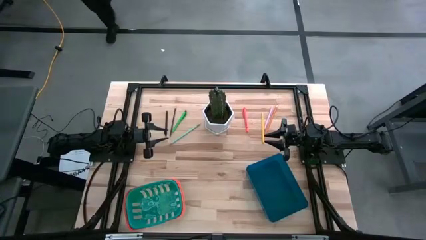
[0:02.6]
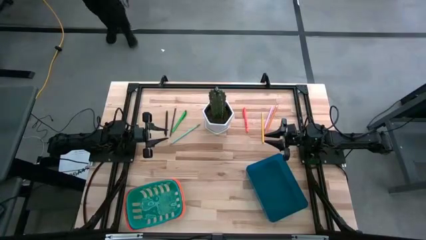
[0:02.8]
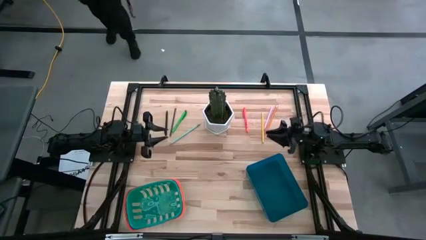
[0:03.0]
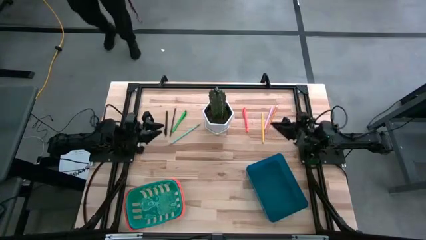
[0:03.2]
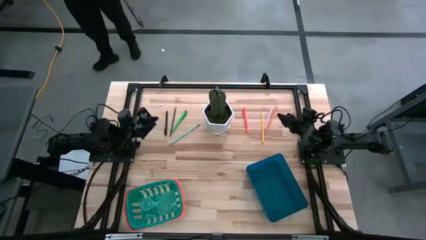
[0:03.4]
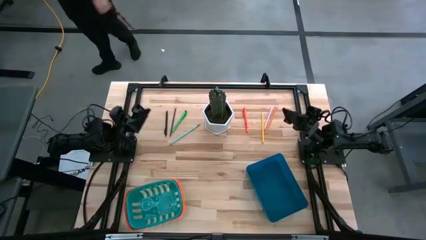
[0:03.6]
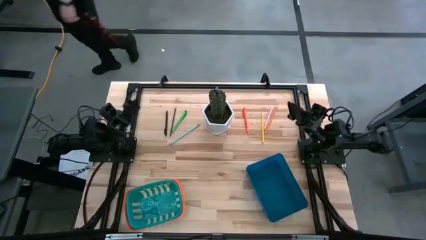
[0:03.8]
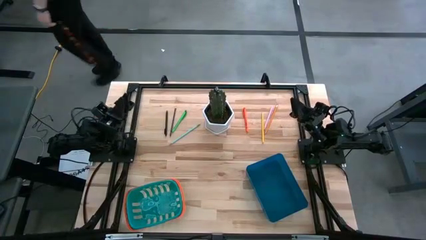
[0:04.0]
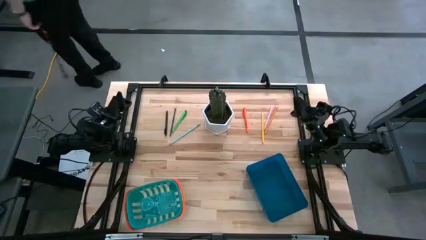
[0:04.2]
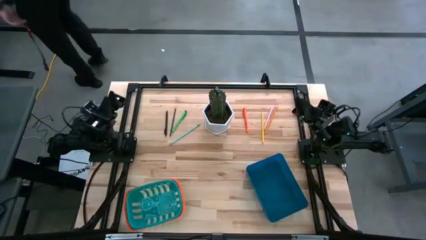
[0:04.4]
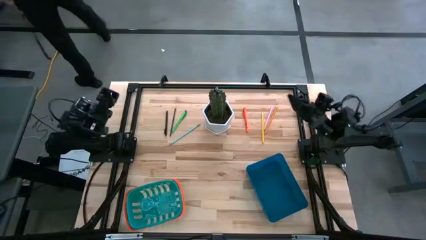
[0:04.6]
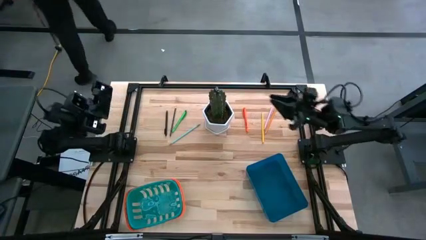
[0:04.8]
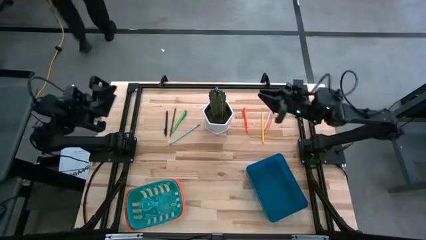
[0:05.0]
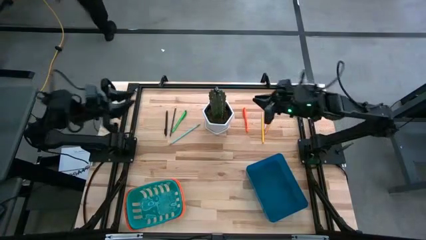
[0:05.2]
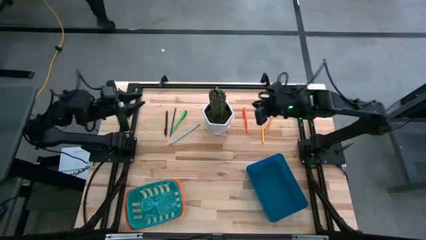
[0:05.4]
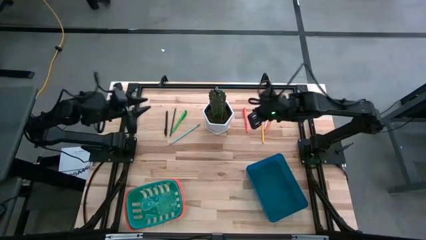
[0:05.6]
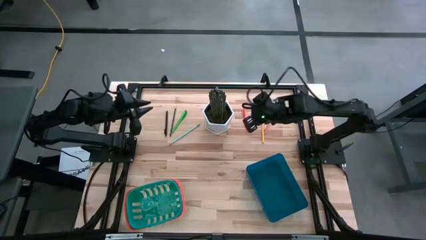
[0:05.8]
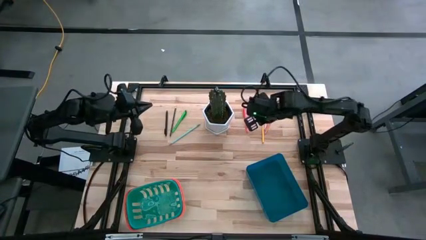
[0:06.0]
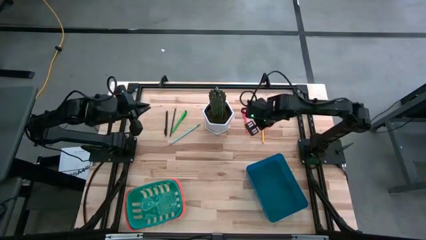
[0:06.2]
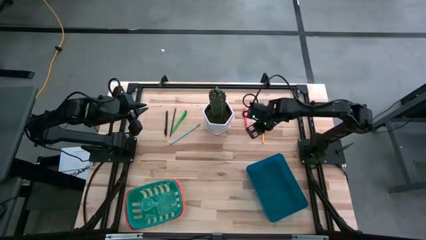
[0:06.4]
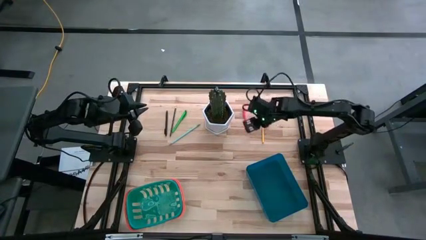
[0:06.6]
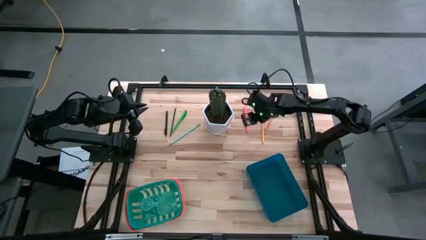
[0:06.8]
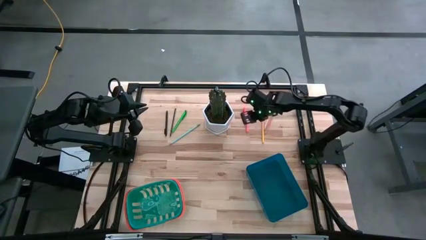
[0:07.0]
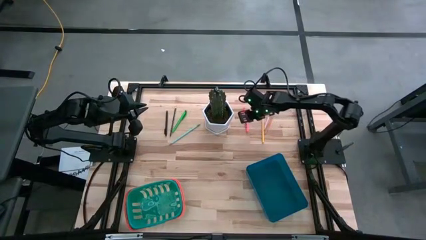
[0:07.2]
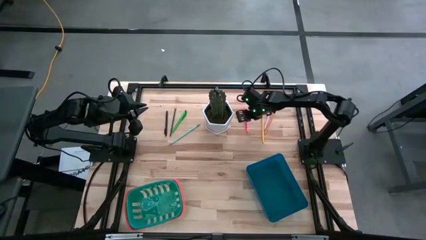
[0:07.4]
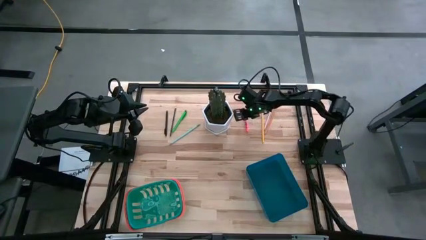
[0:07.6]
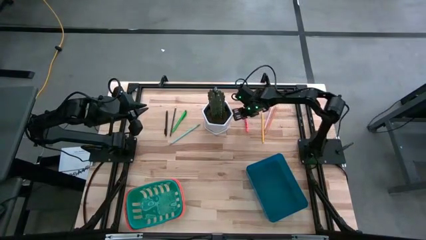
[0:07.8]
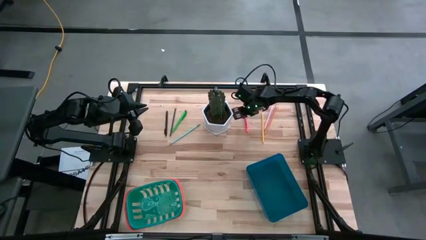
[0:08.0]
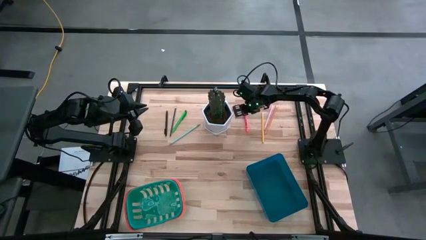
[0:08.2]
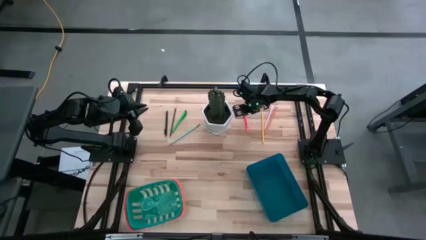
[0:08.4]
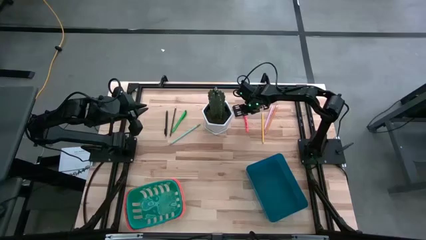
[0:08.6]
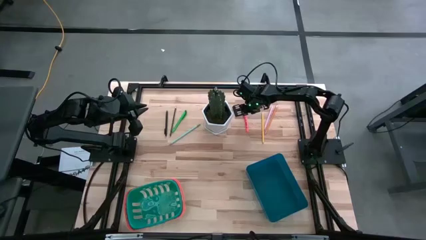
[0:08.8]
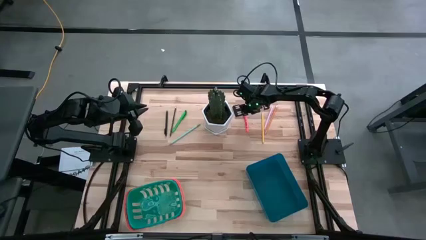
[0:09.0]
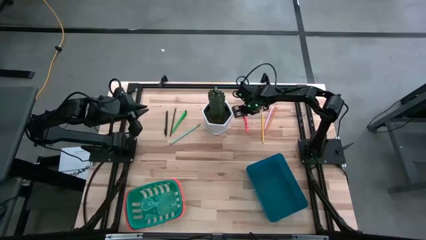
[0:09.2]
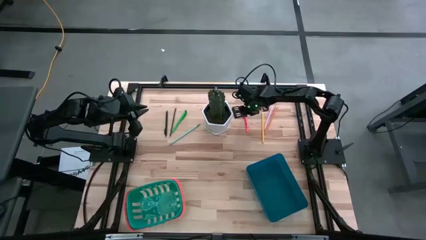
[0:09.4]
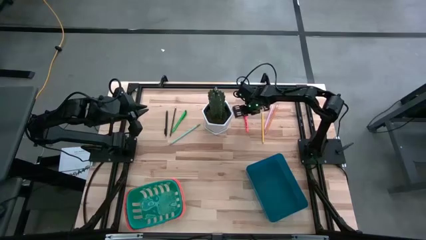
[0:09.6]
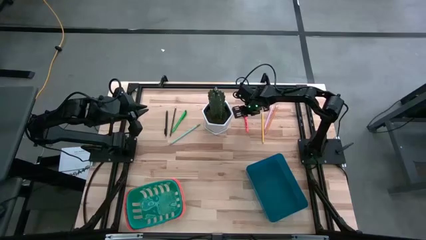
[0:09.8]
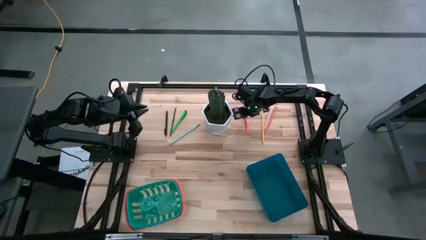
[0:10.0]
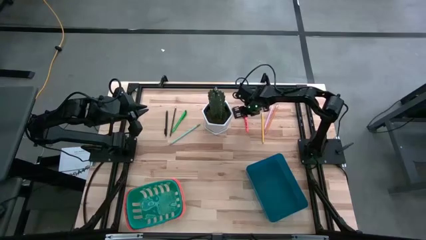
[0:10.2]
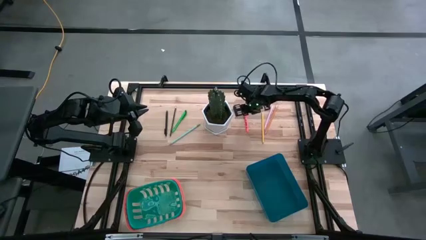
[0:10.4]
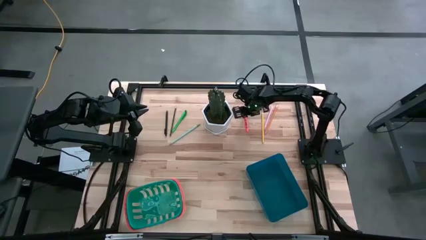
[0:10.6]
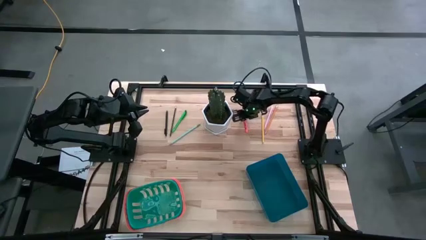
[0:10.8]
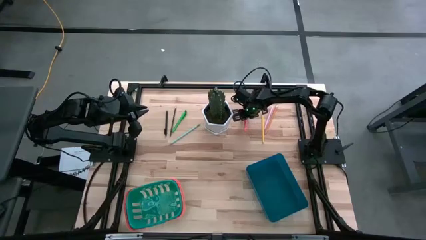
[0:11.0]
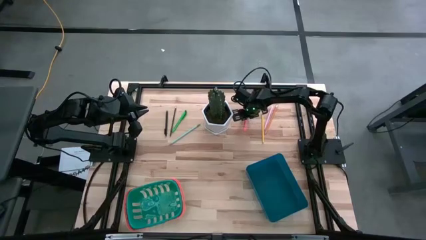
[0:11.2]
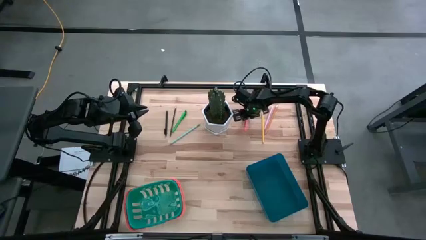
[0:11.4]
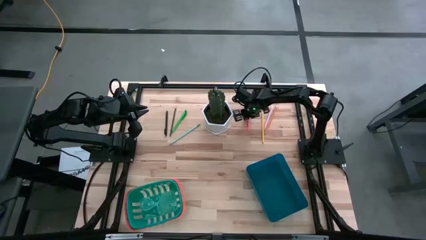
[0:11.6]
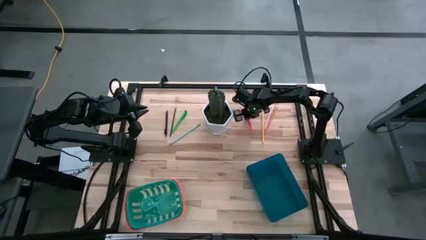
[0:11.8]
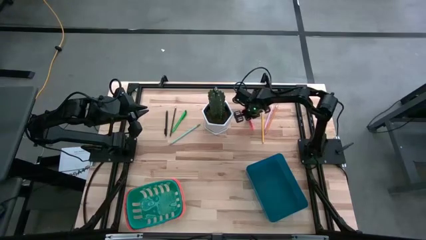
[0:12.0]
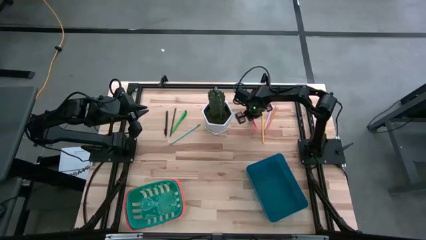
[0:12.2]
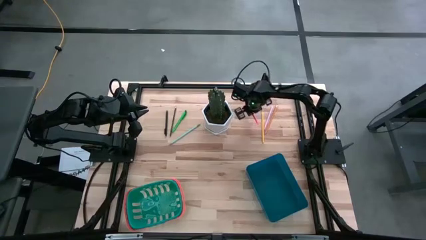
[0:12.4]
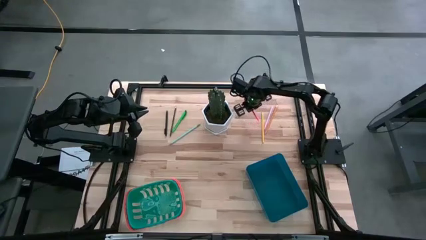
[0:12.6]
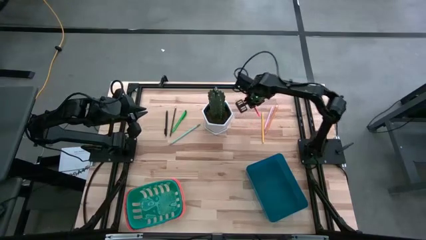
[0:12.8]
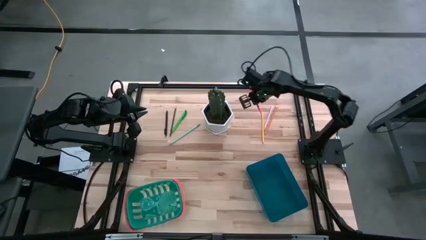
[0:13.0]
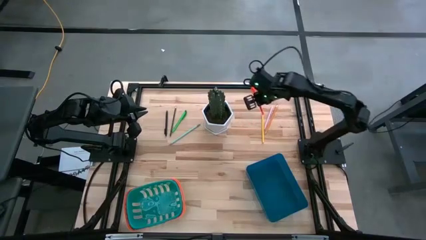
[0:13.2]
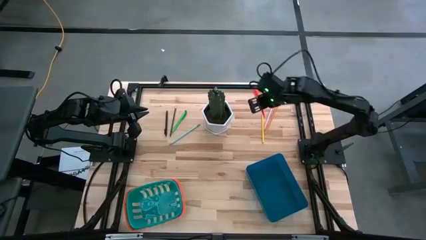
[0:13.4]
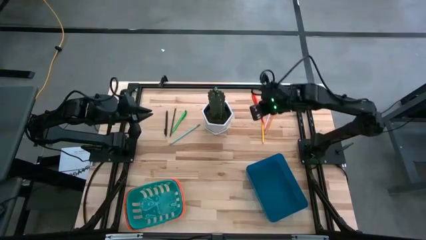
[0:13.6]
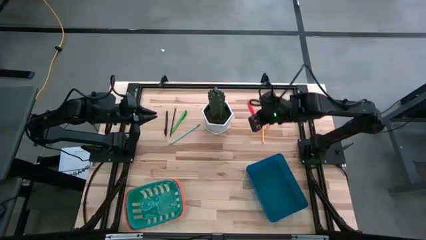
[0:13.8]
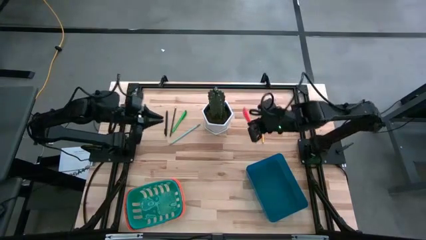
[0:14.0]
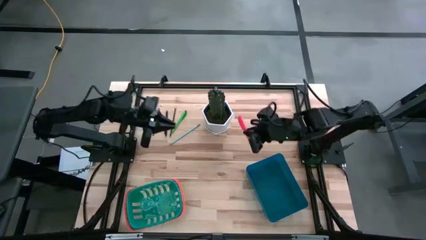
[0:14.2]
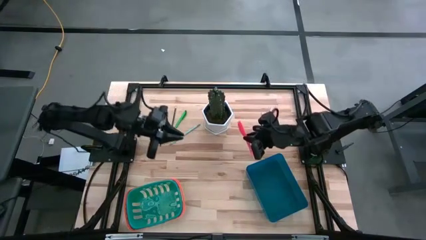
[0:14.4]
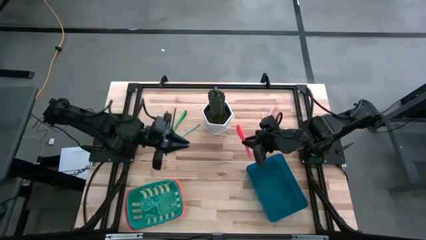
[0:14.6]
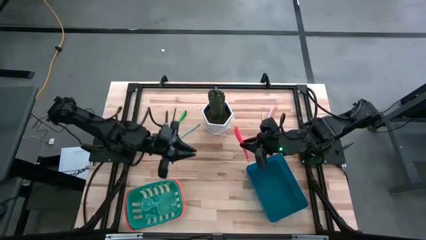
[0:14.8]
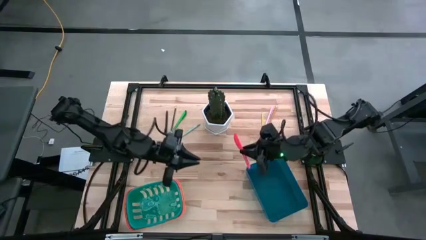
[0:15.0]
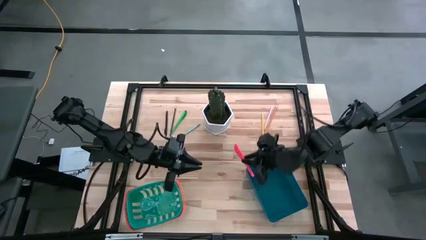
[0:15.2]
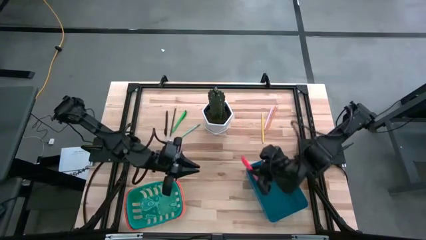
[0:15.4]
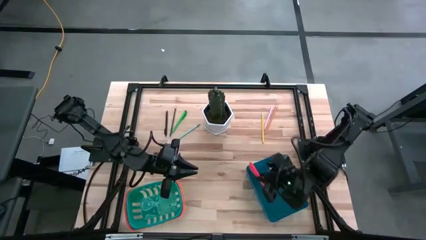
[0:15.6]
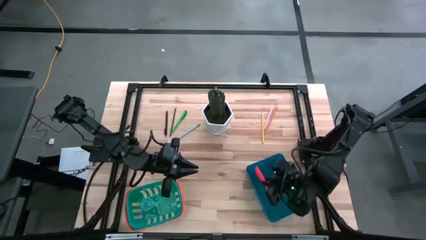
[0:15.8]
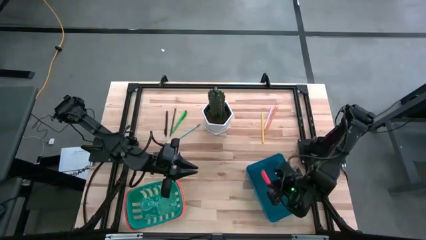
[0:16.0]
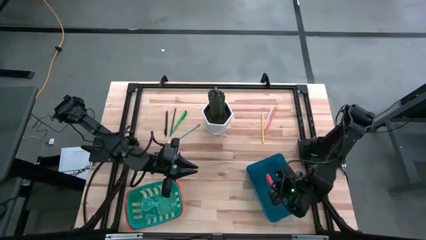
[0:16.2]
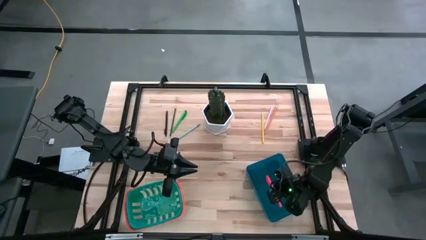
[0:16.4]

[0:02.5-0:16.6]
Task: Sort pens & pencils
Put the orange pen into the blue bin

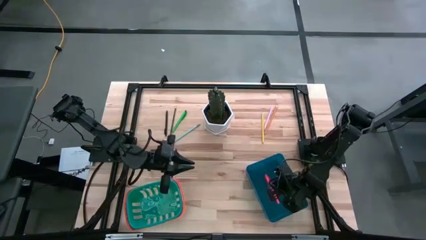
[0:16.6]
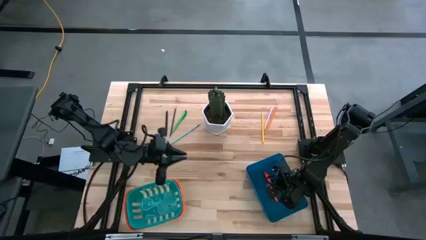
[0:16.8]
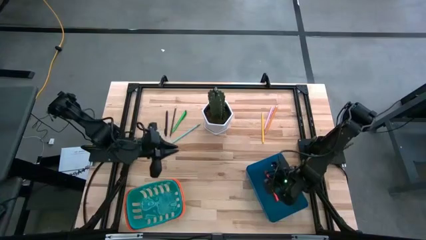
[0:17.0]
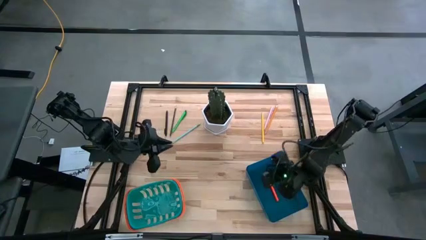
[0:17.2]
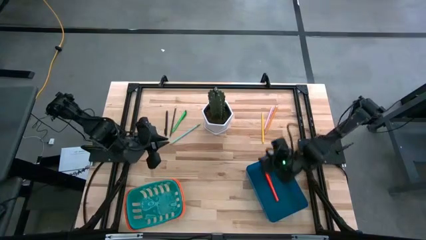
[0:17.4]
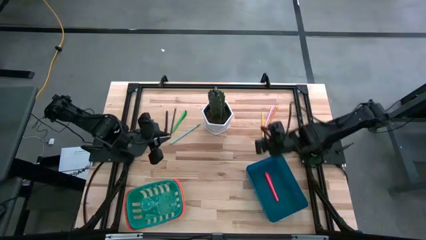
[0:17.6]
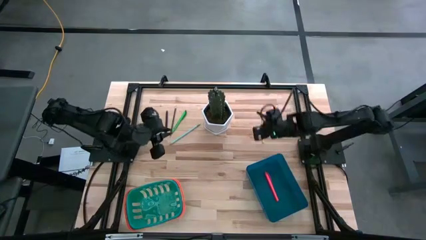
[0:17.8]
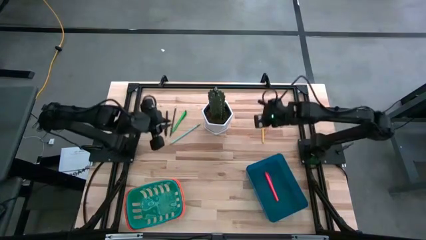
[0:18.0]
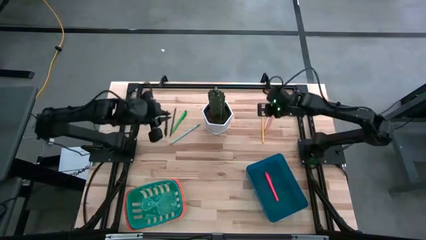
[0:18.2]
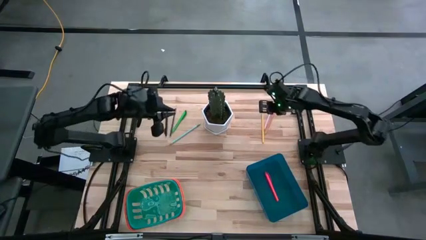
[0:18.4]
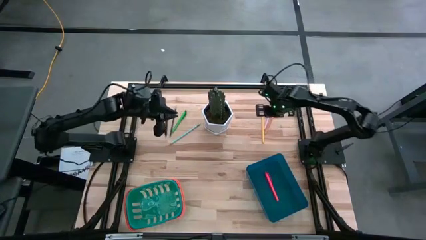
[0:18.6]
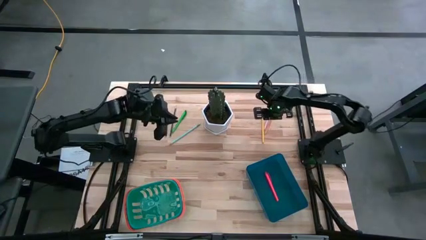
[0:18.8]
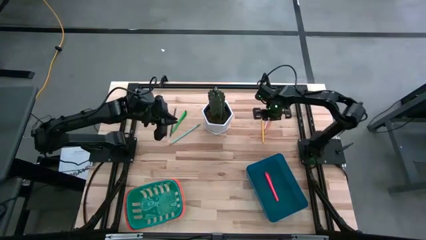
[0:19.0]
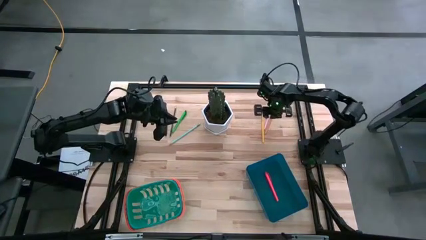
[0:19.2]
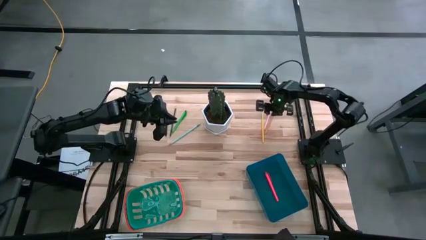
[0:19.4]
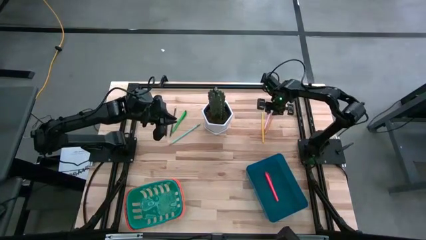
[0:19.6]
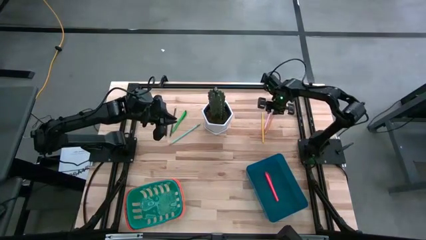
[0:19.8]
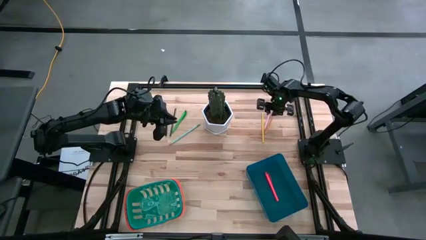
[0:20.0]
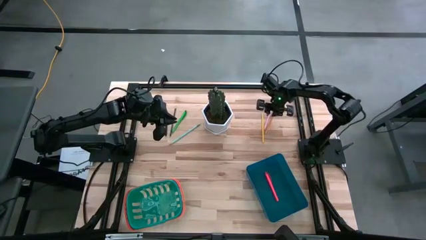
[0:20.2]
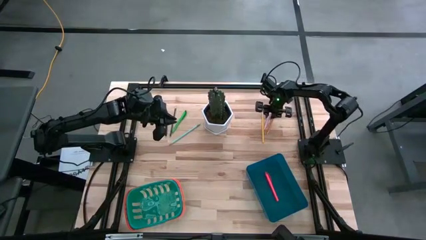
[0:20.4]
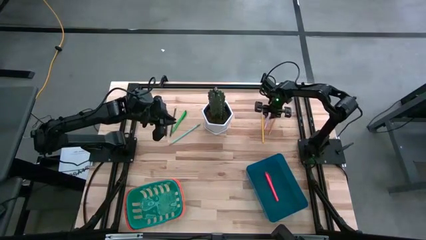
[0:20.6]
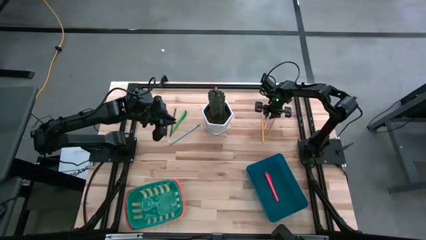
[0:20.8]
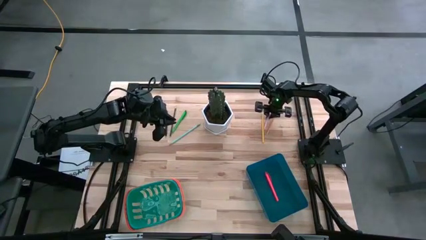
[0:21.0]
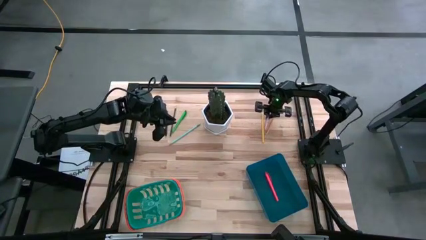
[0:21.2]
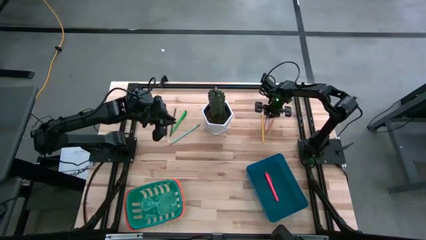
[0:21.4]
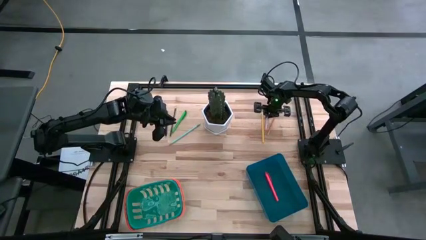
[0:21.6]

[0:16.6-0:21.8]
Put the pink pen into the blue bin
